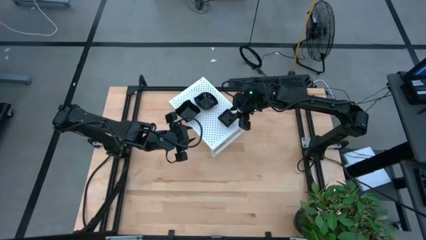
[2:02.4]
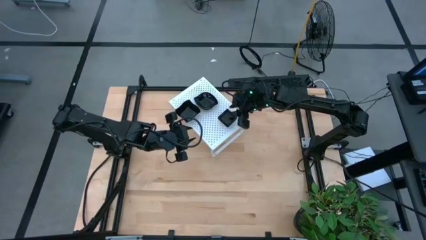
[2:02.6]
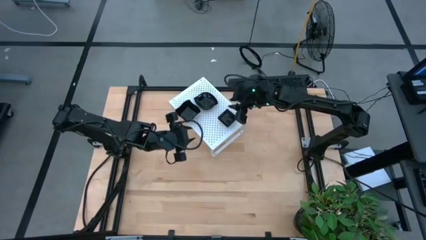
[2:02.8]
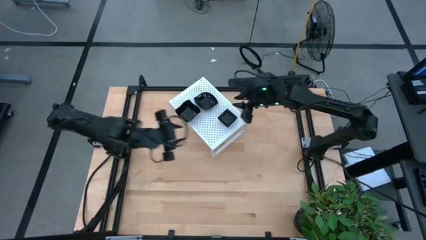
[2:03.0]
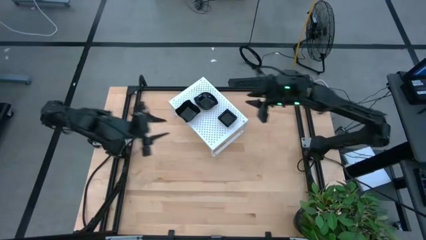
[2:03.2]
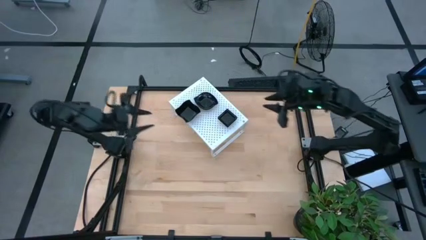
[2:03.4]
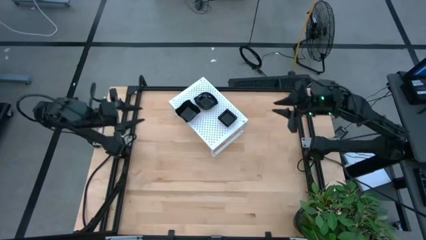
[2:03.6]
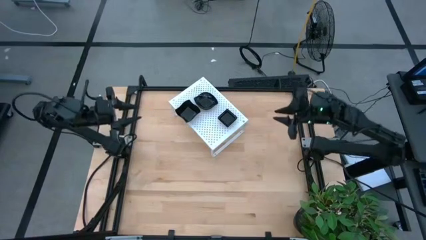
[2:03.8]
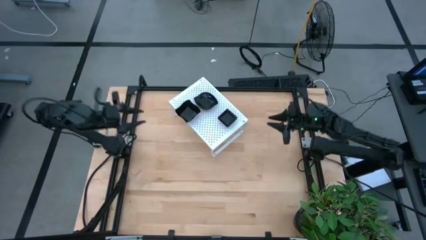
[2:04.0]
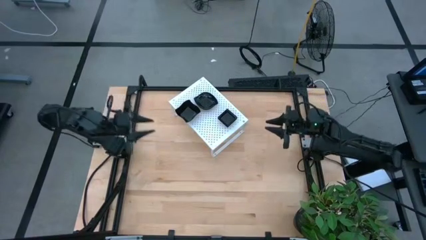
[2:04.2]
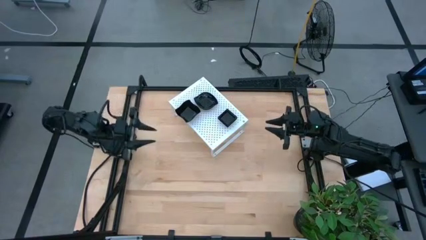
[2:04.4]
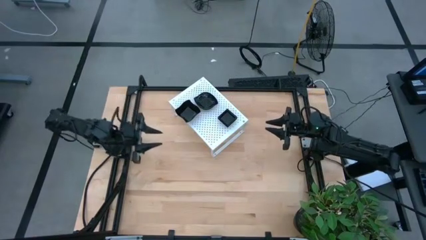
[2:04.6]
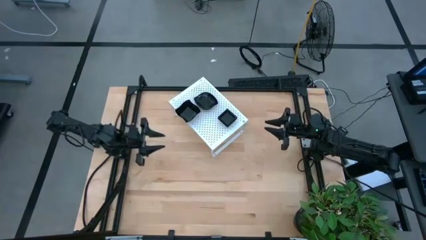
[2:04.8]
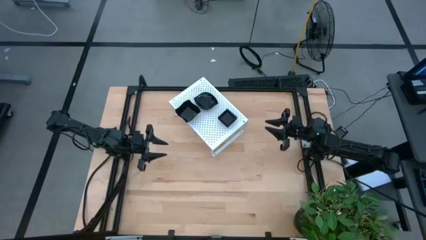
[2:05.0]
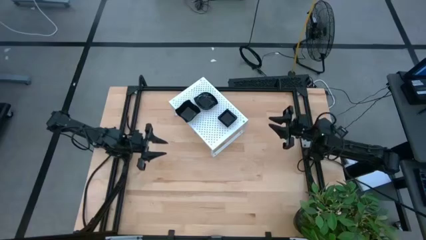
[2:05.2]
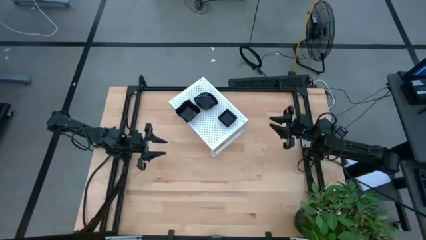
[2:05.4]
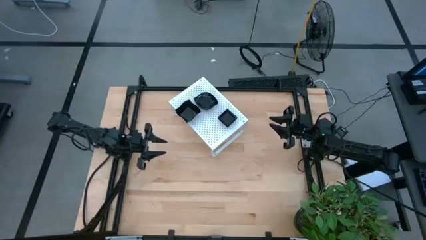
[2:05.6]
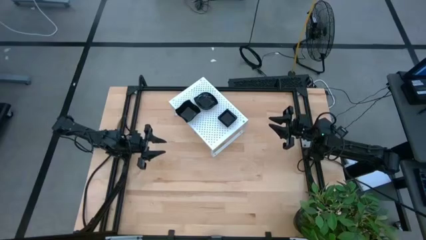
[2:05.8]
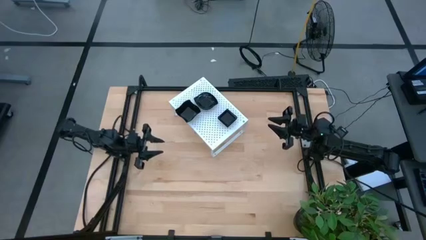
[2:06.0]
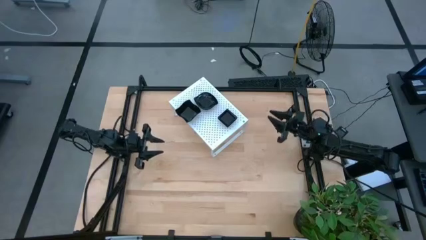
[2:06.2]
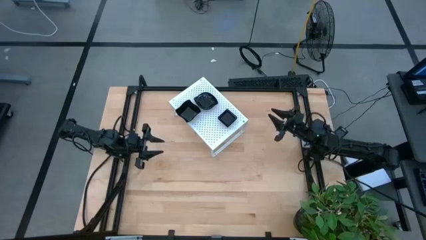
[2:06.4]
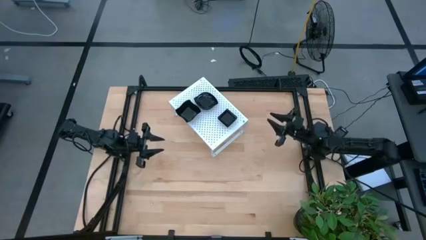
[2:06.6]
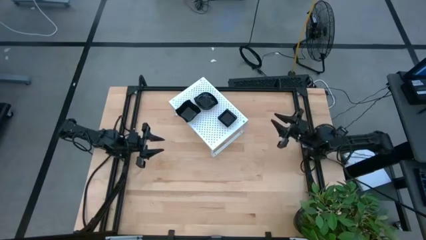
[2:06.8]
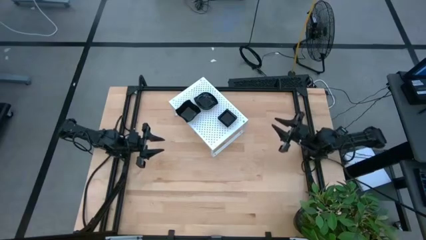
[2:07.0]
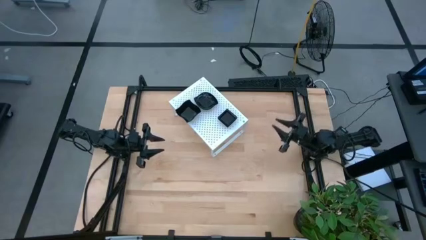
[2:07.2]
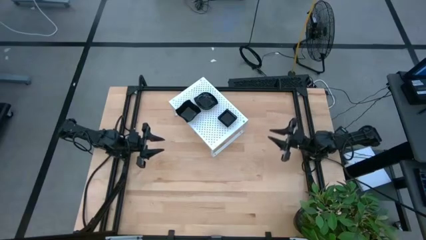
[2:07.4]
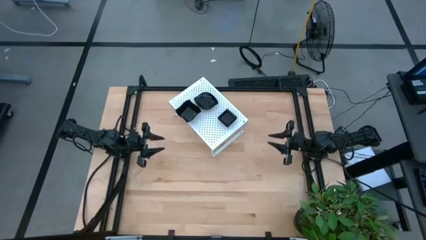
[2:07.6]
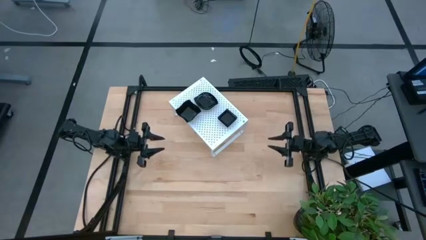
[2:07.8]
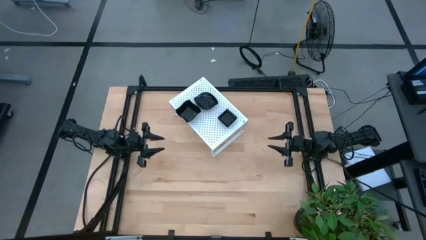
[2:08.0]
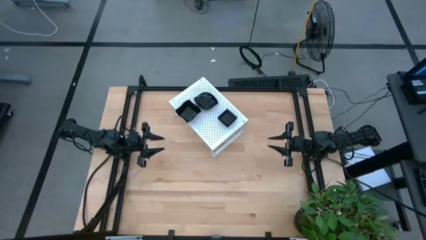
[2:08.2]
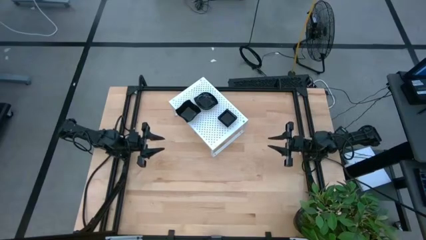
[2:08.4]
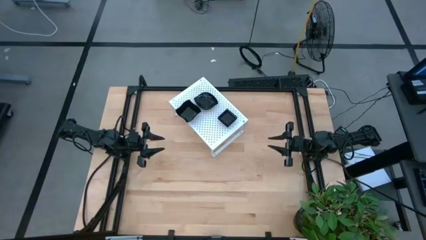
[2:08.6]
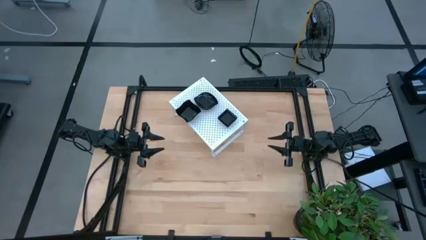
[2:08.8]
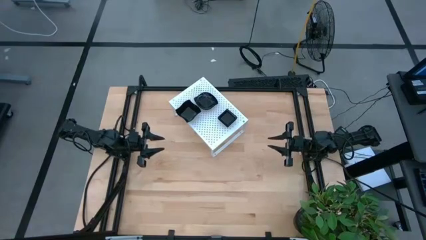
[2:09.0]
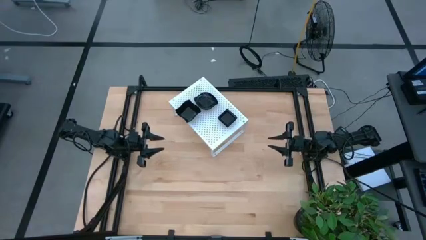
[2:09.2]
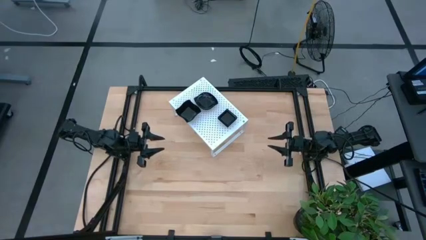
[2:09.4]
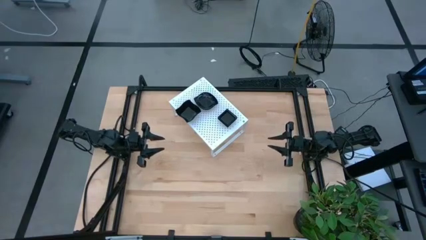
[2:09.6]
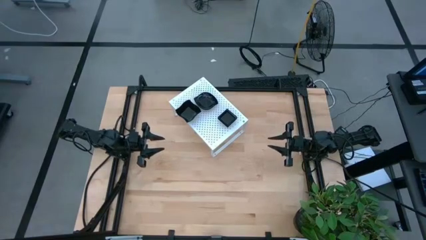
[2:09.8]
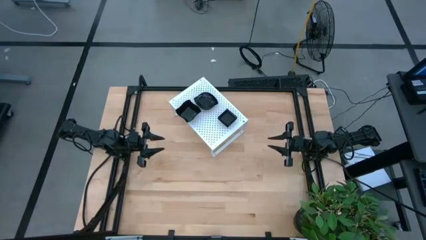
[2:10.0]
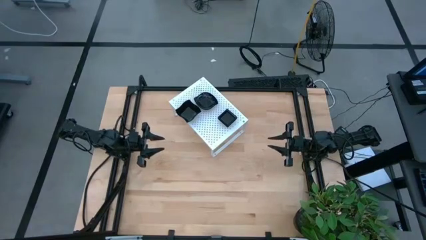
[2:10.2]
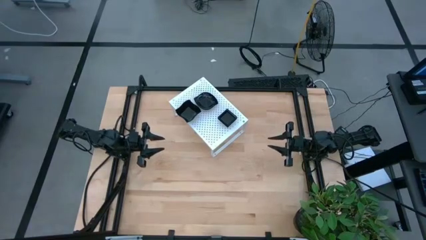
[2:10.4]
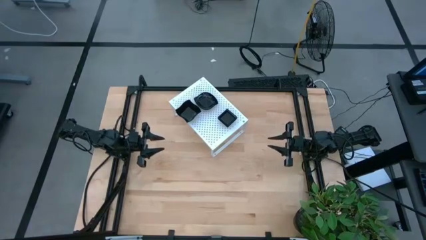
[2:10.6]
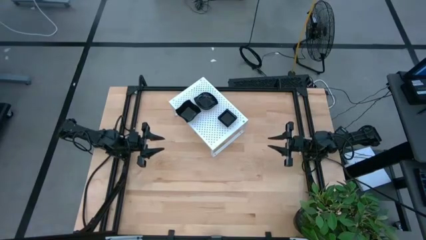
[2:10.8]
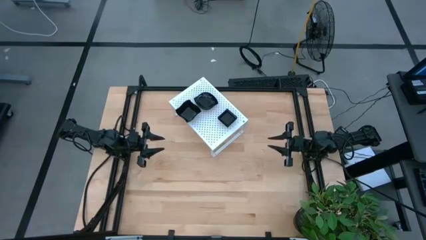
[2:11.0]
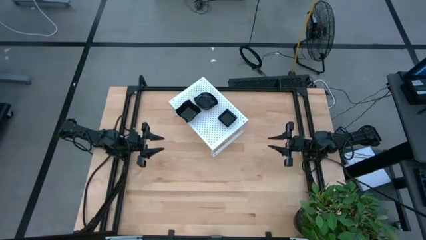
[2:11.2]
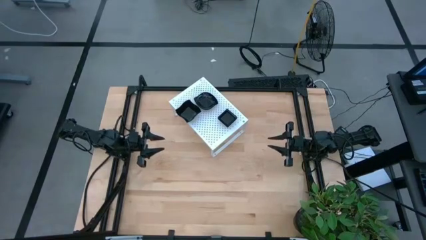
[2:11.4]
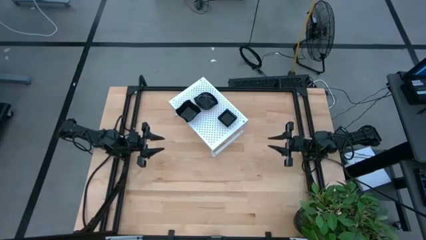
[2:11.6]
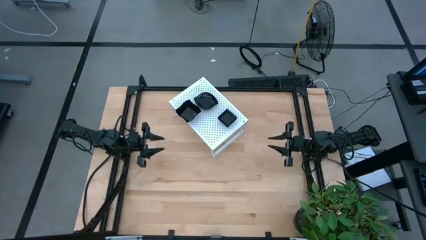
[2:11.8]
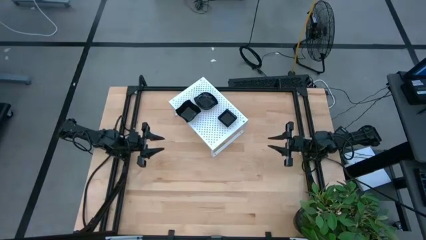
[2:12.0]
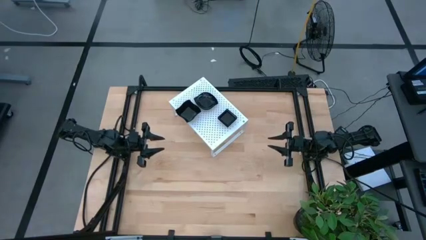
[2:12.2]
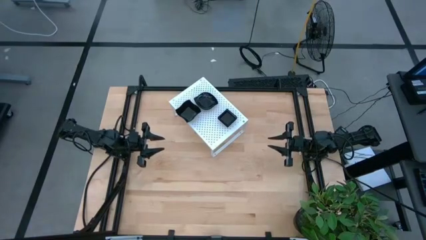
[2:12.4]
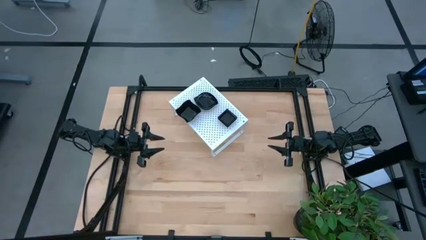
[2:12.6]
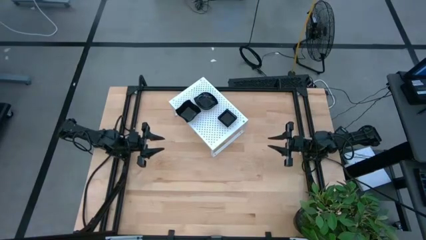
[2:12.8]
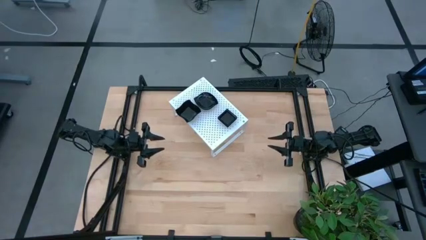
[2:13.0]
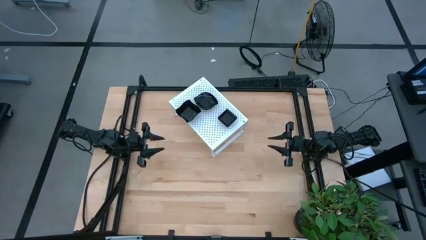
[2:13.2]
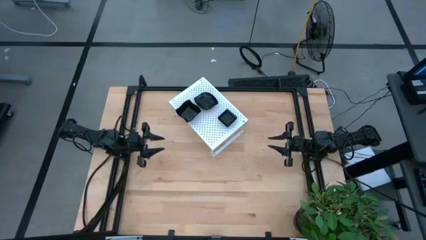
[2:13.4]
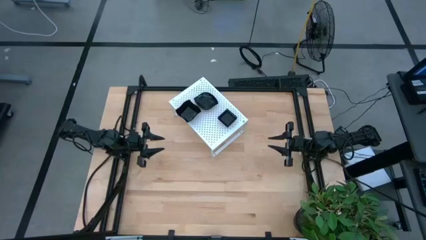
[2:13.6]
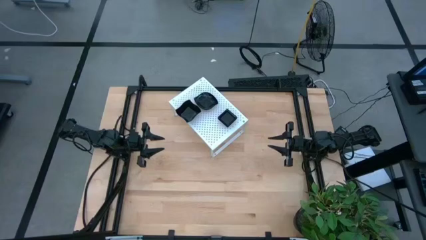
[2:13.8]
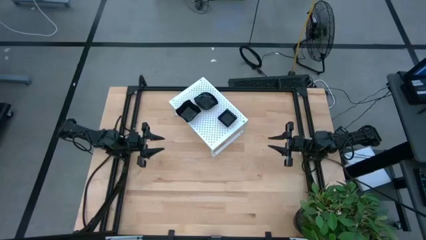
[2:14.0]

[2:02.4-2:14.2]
Task: Pick & Place Mini shaped plates
Return to Home Position
